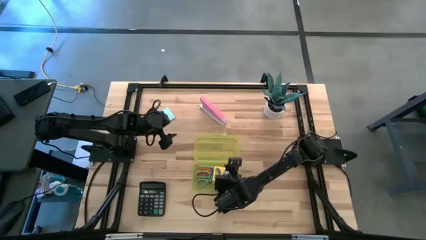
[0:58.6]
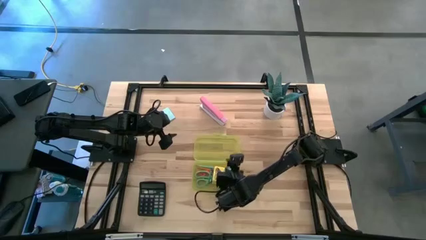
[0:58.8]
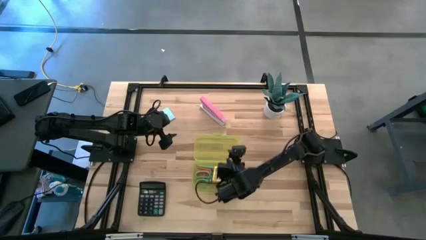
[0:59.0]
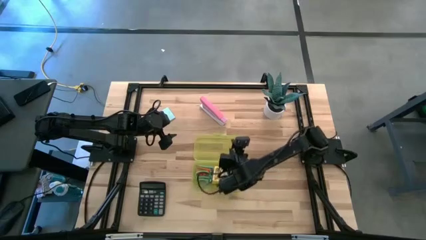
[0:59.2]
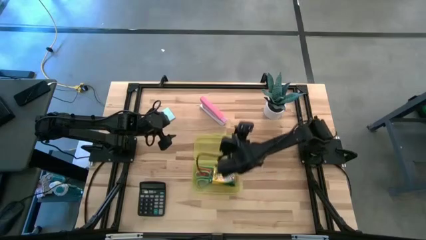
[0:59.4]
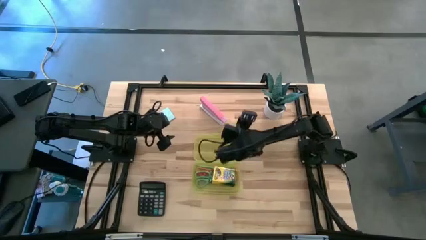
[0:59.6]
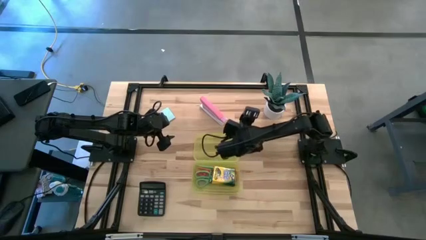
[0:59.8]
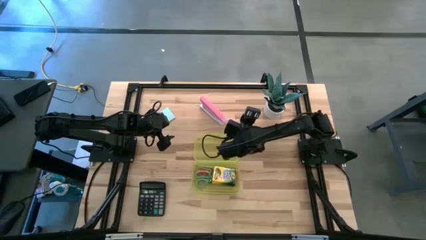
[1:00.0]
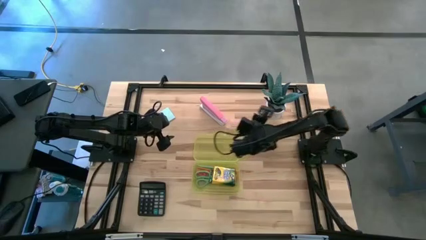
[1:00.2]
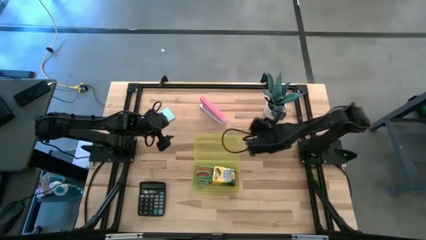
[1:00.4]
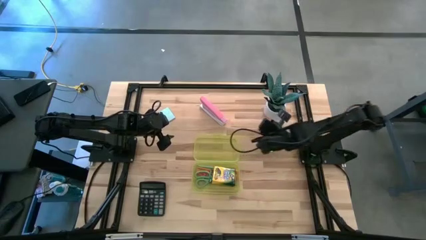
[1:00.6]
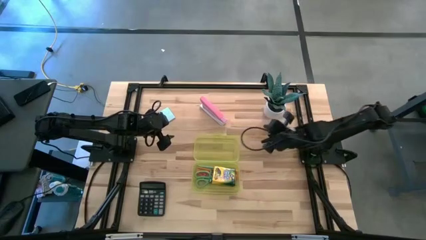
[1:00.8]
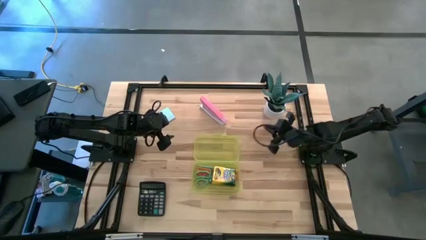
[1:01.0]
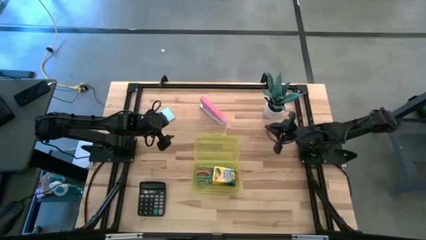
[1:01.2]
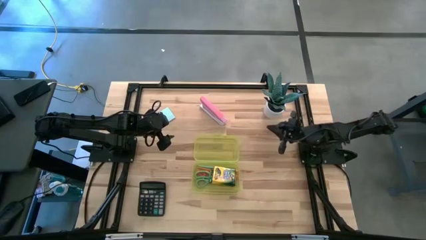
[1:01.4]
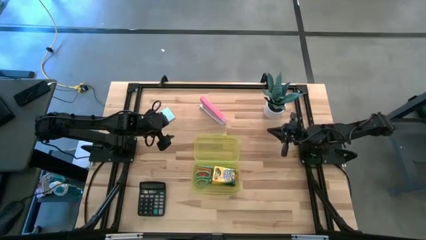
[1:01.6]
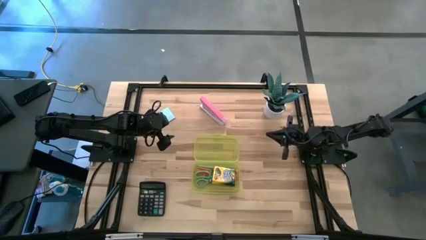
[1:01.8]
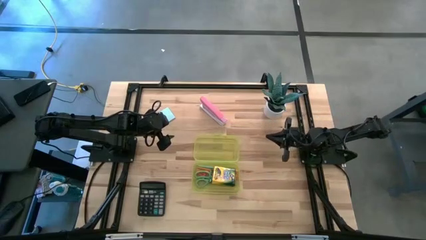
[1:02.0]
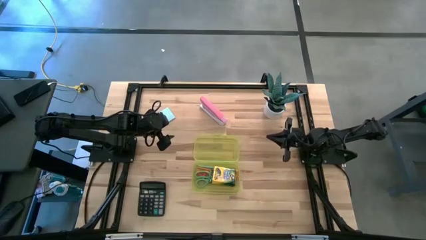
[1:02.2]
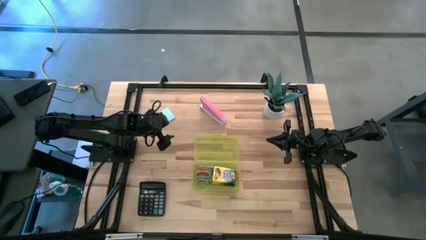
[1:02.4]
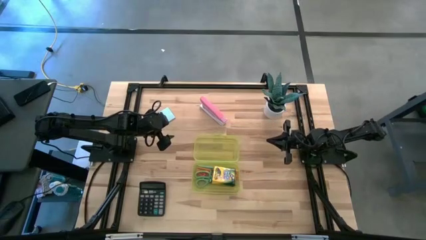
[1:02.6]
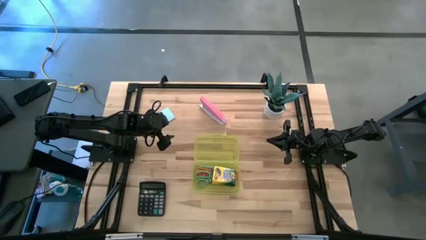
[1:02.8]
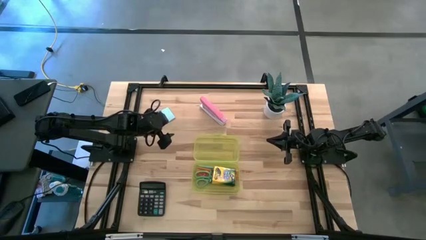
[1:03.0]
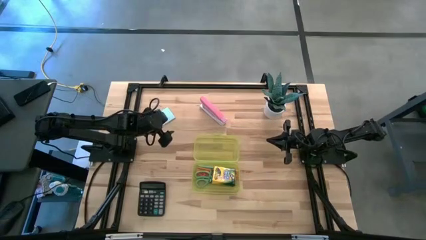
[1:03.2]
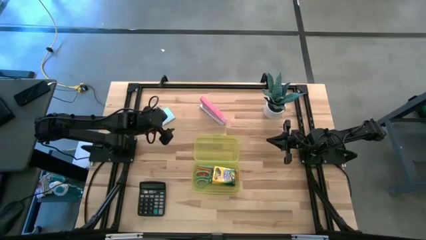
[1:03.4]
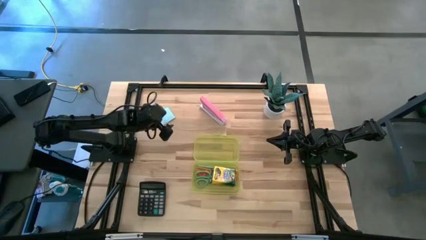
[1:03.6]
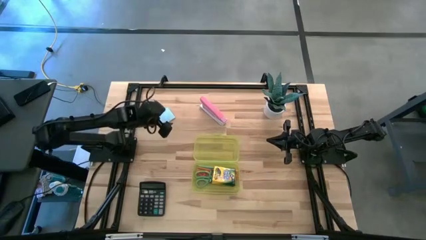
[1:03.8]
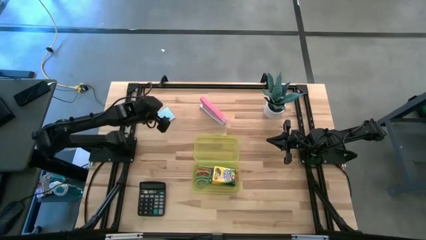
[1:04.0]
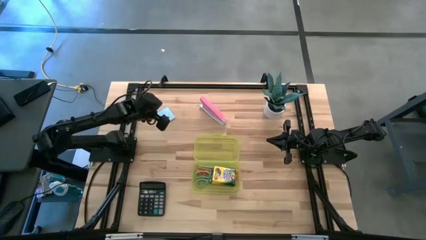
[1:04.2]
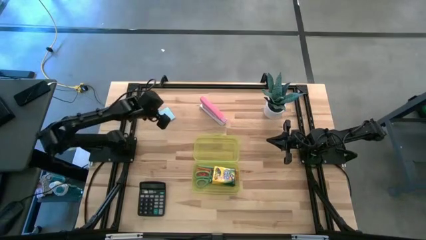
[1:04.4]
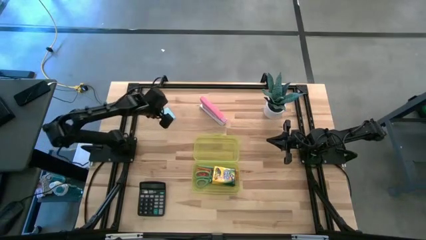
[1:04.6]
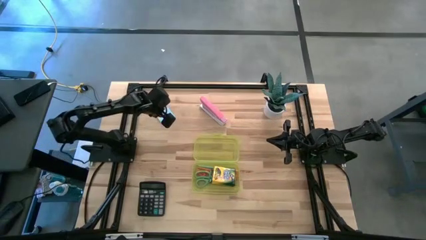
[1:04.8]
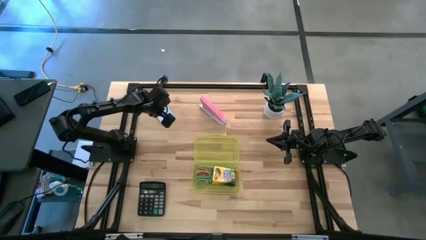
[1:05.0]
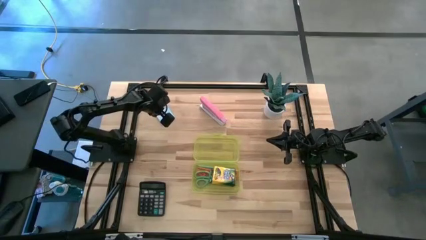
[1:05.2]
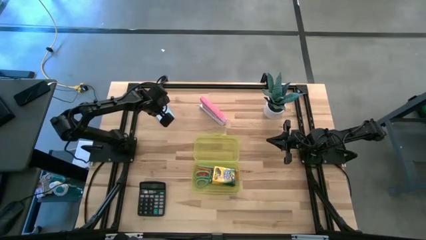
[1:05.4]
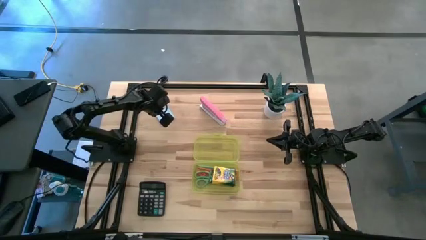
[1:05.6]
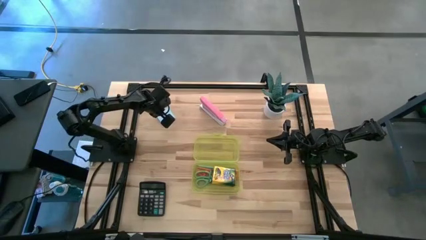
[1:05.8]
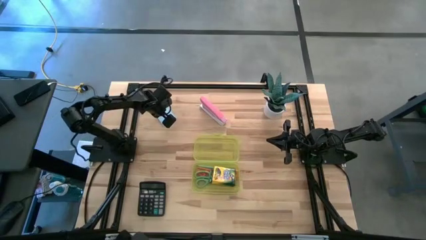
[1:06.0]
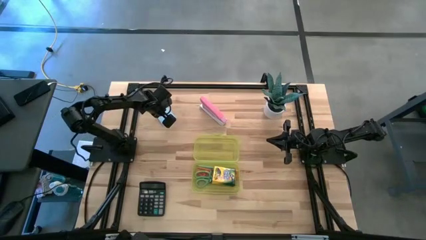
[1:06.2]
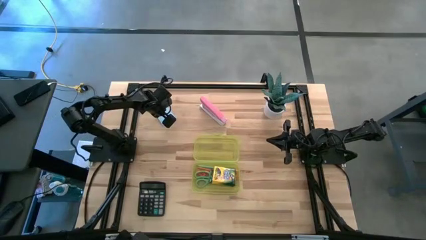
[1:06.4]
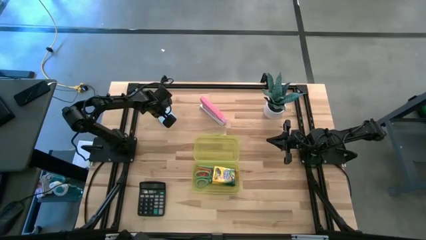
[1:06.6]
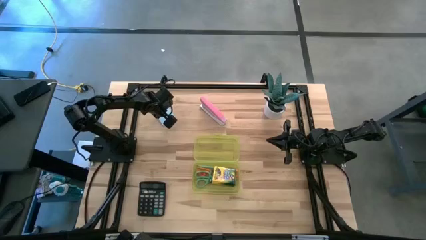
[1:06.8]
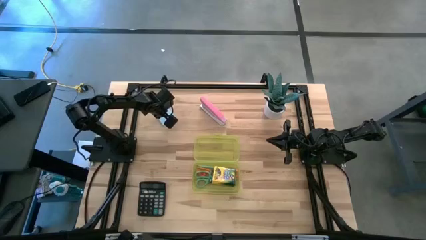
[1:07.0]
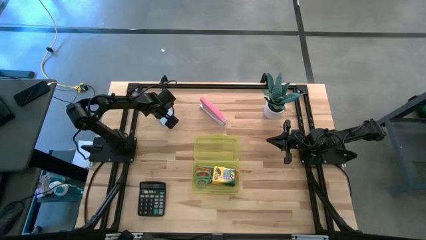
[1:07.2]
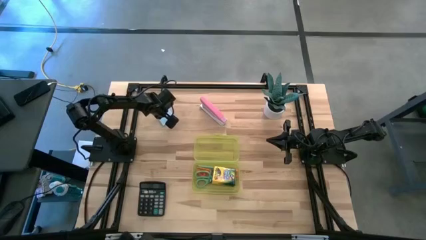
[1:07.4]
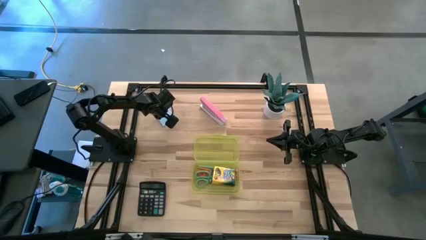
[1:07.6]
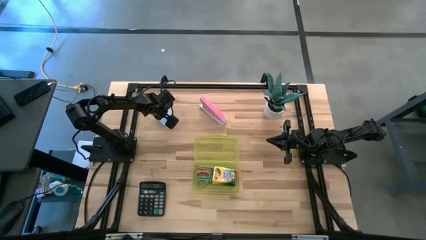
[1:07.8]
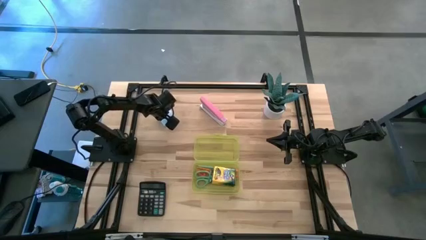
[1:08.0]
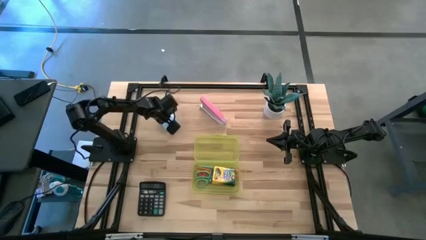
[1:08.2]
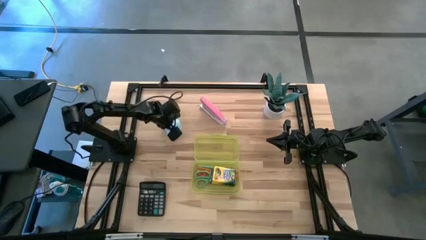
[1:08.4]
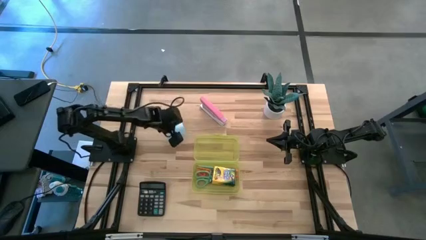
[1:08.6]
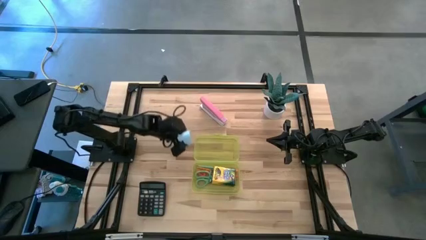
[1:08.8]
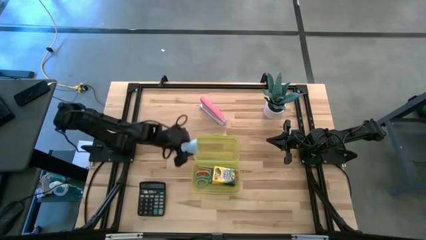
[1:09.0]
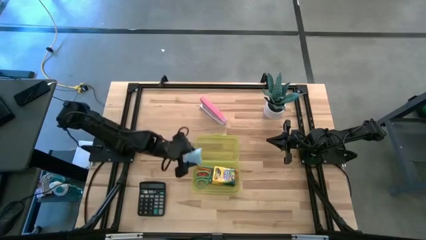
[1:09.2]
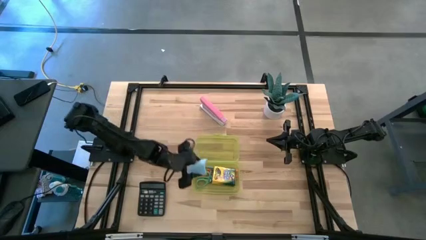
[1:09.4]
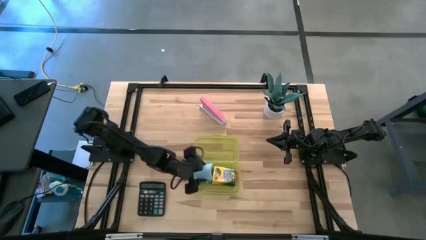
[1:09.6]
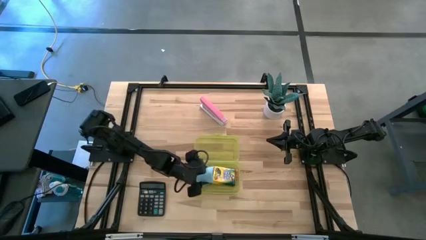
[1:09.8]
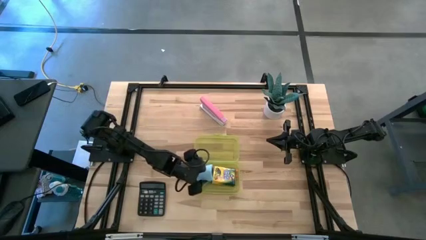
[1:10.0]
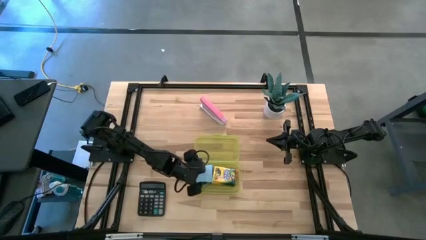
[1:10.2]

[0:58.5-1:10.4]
Task: Pack school essentials
Put the blue sticky notes into the yellow supply box
